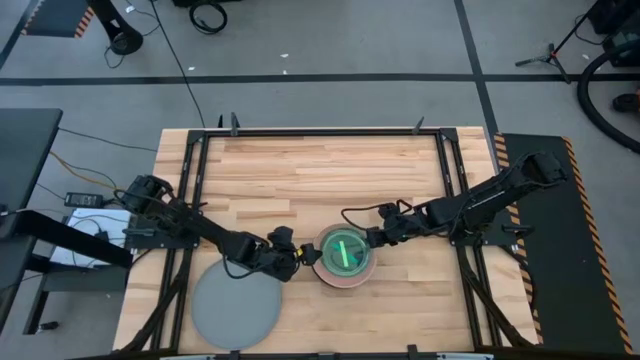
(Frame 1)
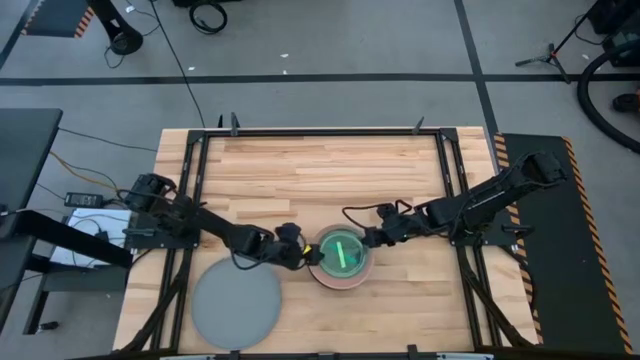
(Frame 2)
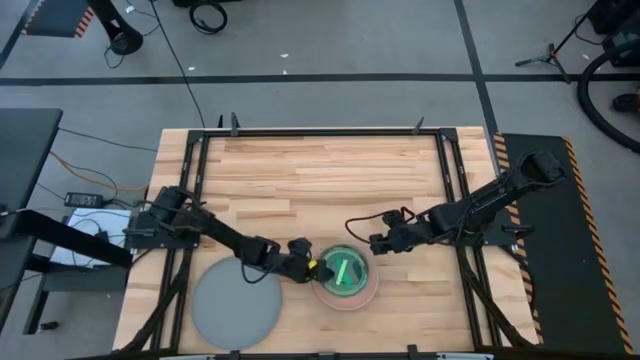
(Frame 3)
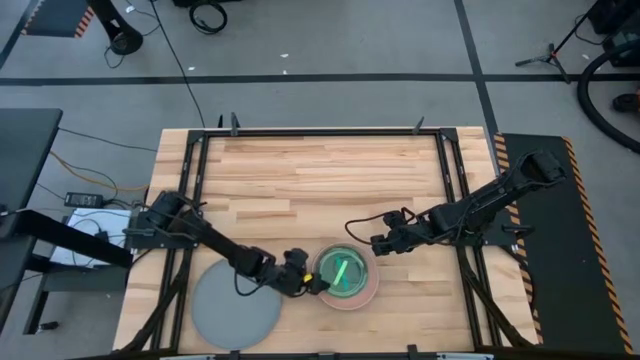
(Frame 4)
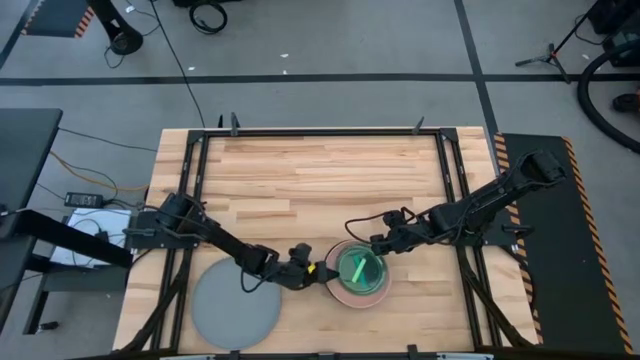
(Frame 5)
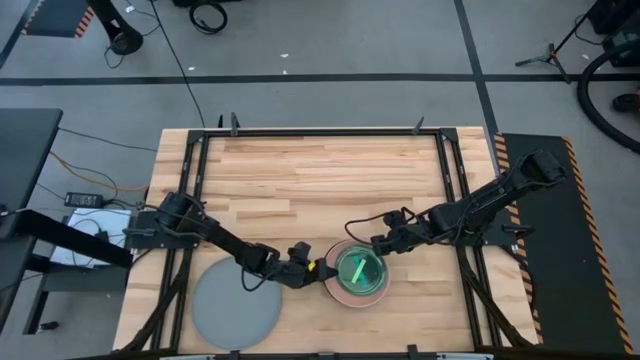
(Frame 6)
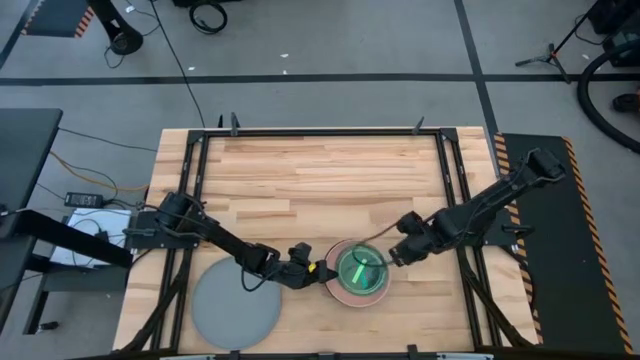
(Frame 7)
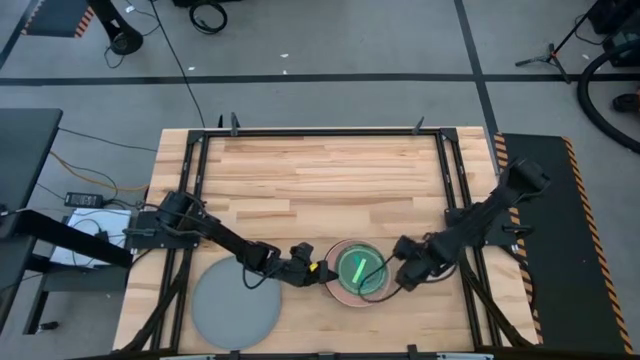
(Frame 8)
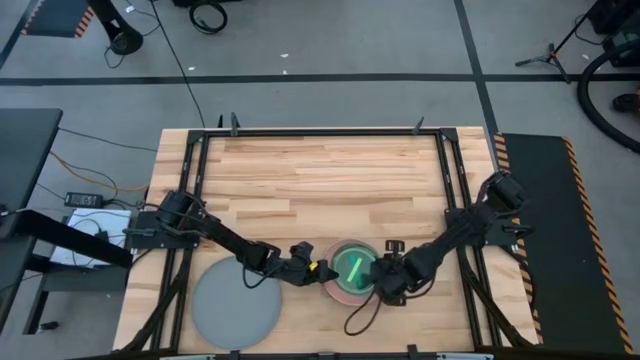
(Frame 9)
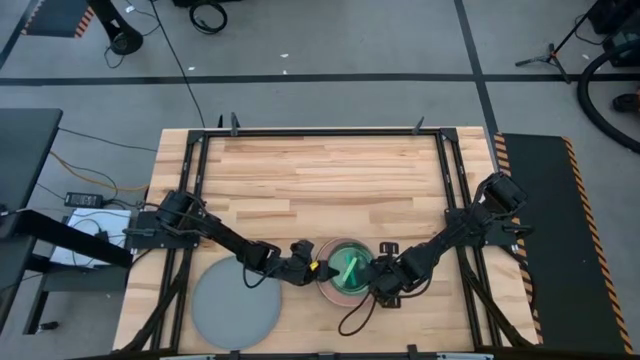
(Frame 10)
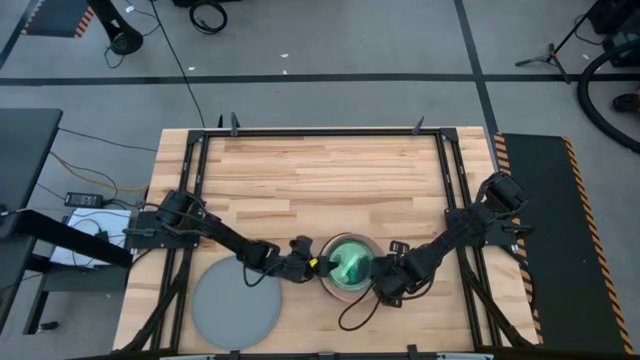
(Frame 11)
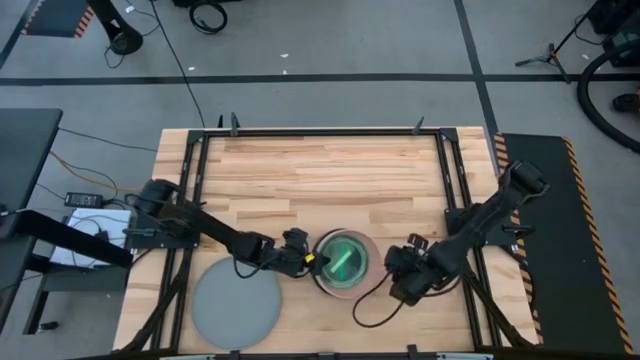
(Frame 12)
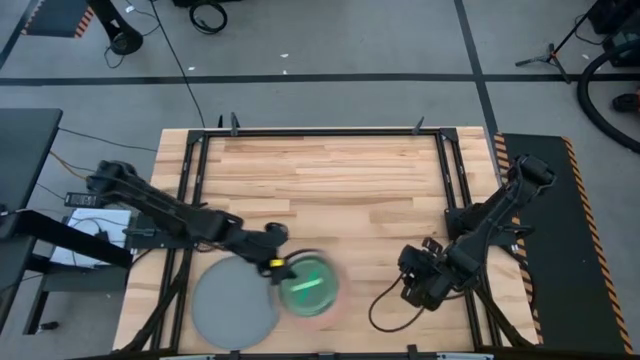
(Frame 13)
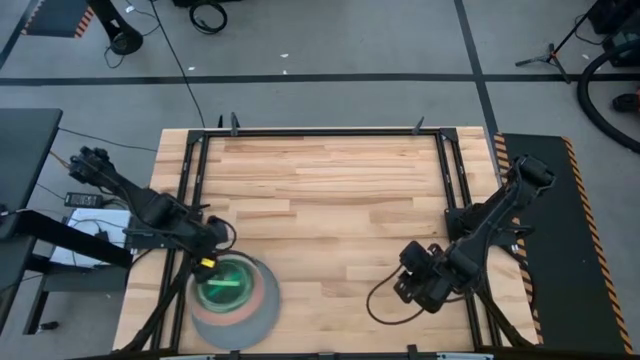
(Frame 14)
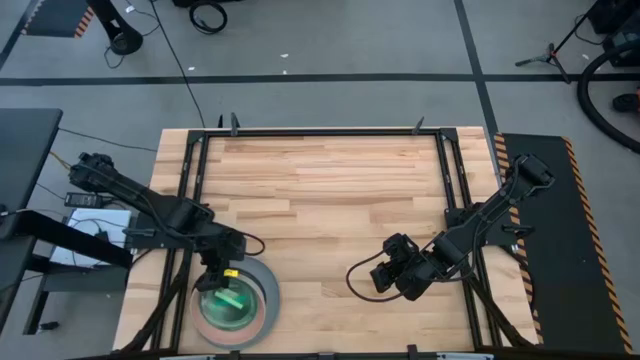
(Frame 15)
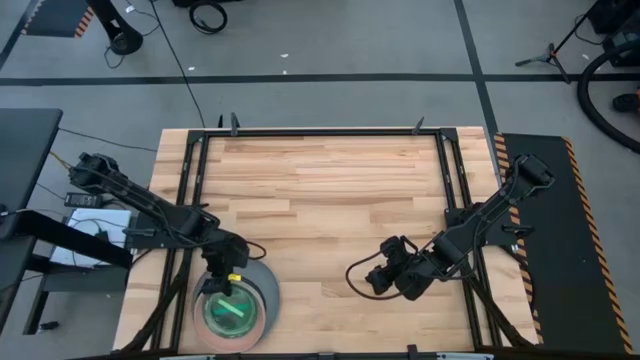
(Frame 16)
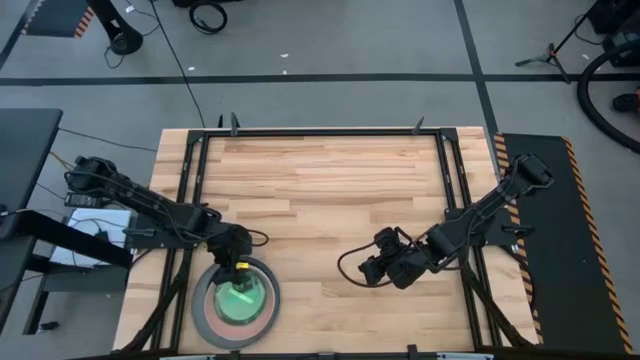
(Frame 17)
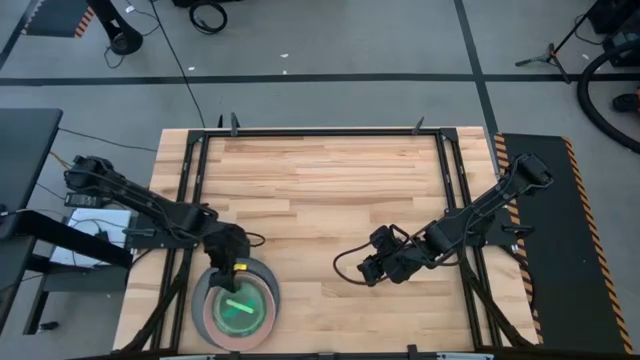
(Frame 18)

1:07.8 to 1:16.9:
Task: Stack plastic plates
Stack the stacked plates on top of the gray plate

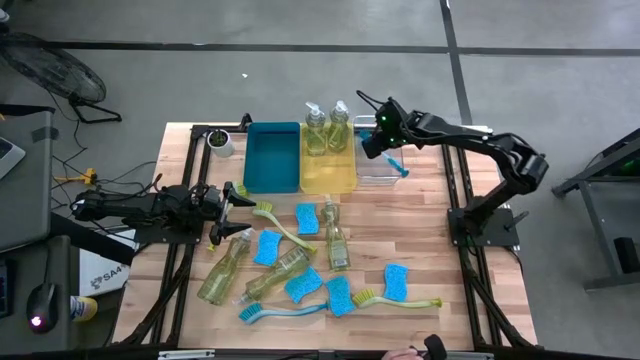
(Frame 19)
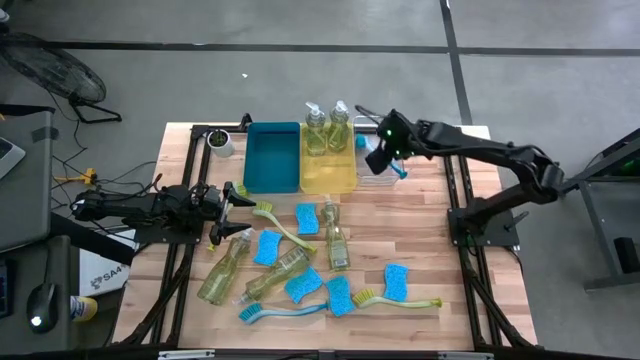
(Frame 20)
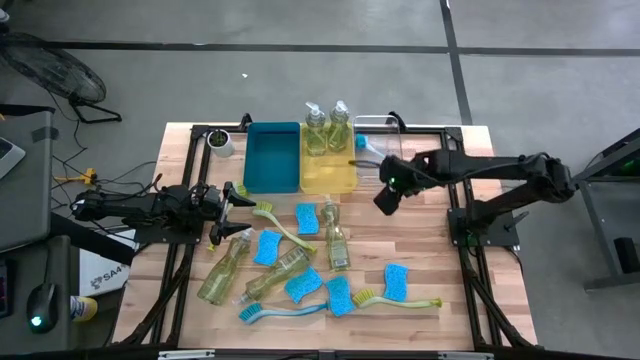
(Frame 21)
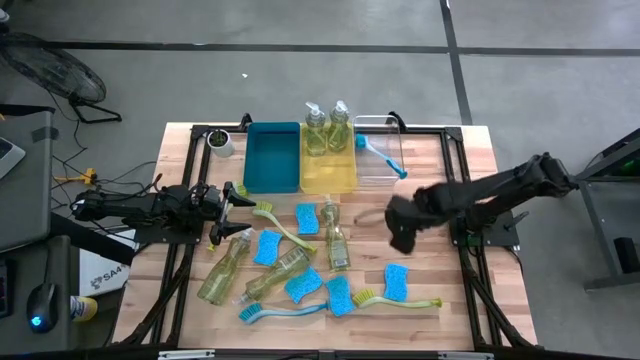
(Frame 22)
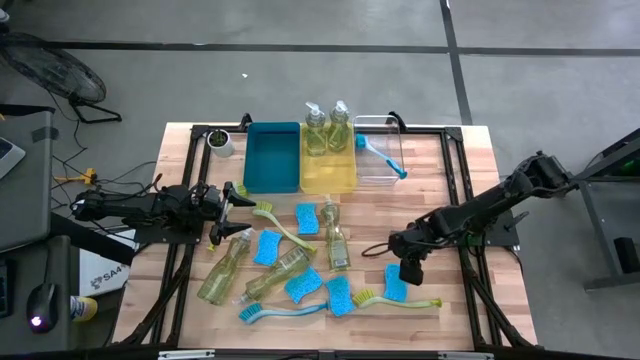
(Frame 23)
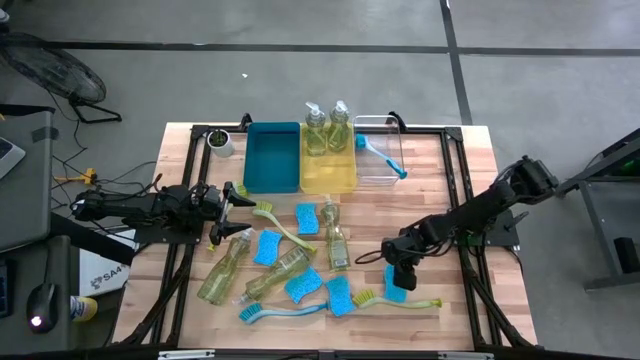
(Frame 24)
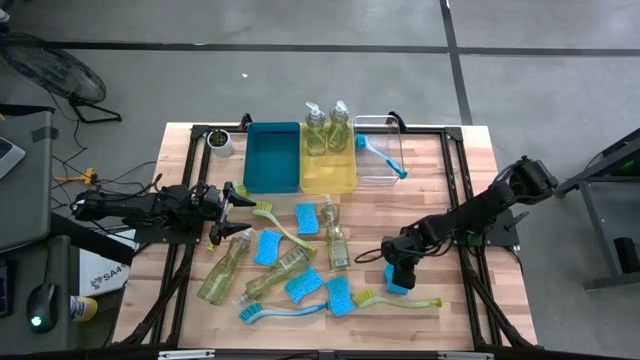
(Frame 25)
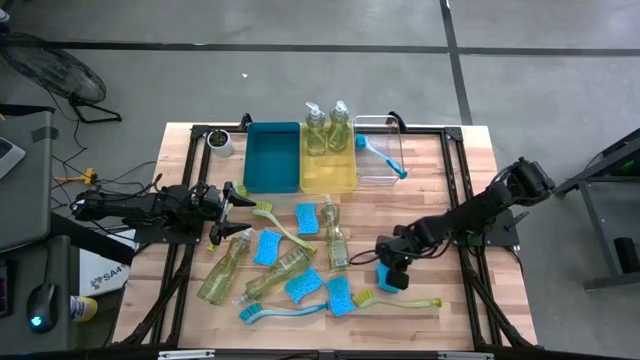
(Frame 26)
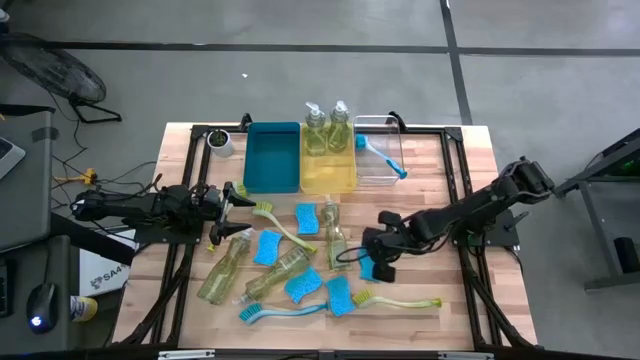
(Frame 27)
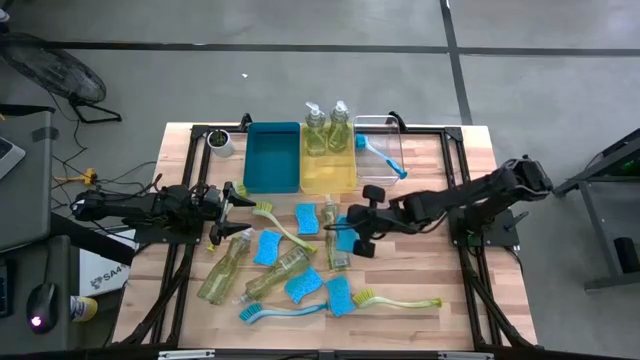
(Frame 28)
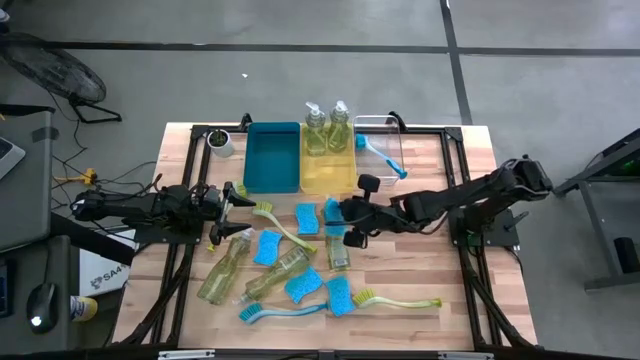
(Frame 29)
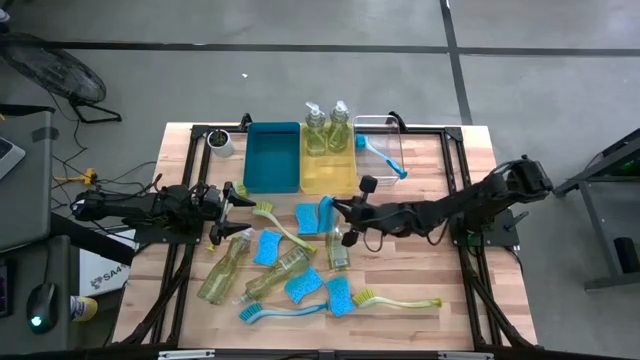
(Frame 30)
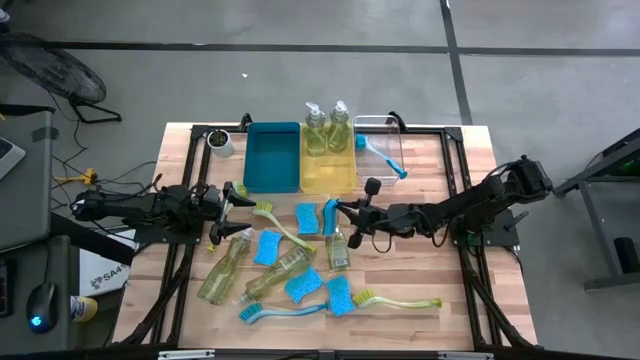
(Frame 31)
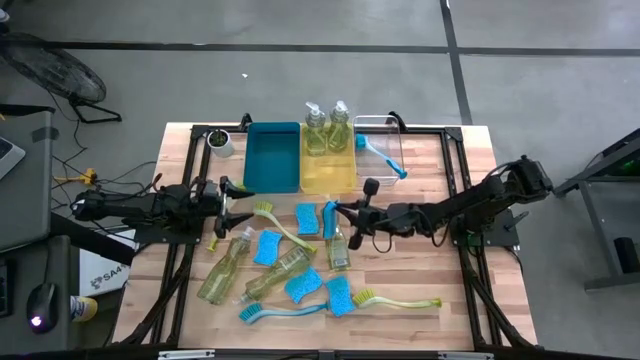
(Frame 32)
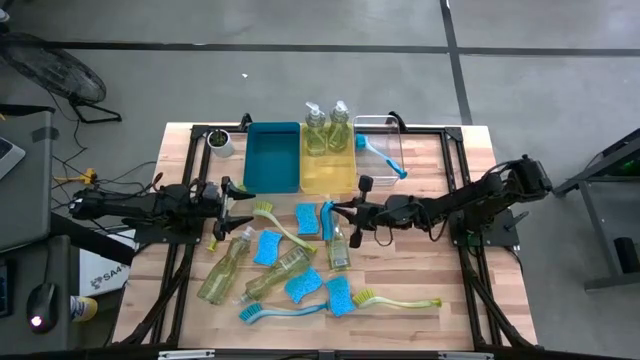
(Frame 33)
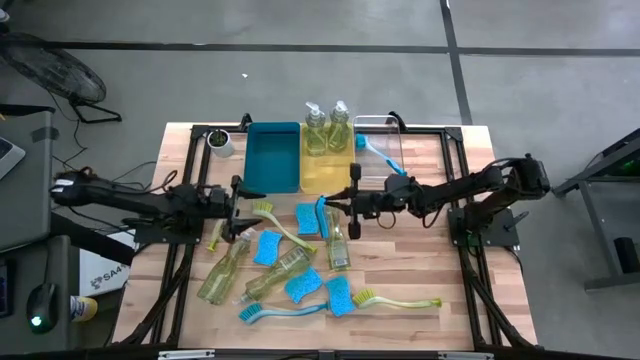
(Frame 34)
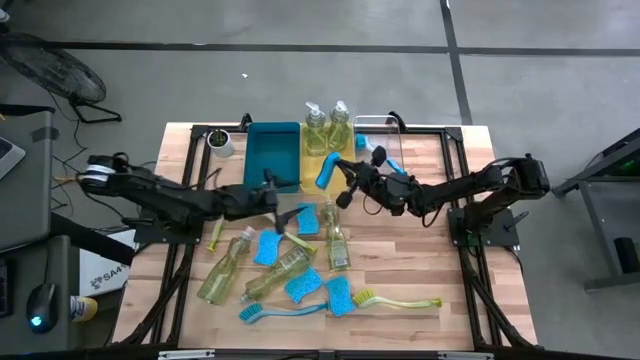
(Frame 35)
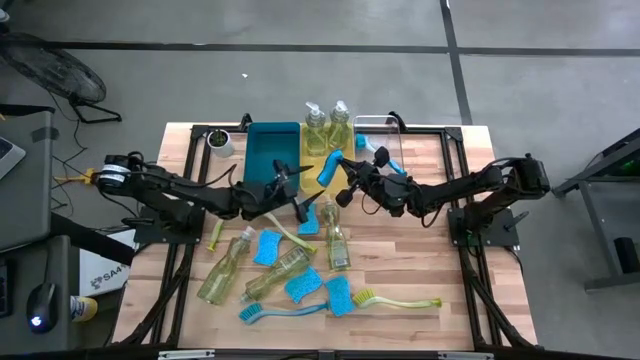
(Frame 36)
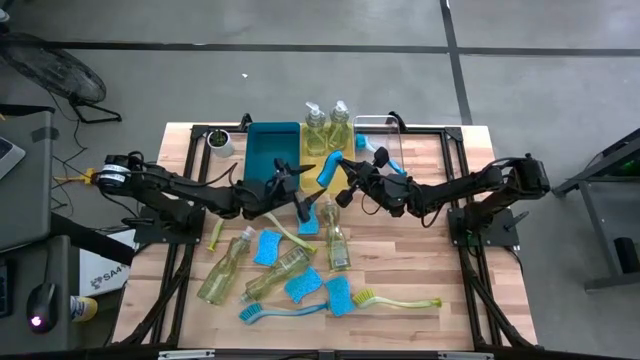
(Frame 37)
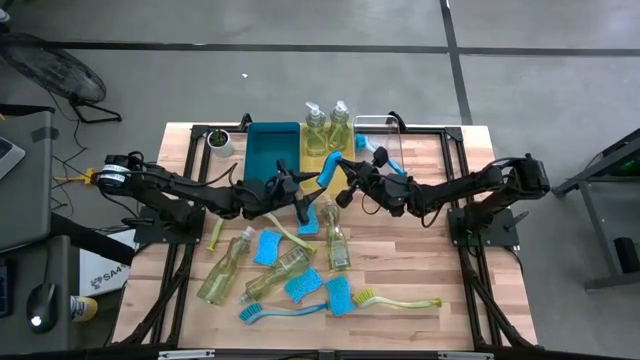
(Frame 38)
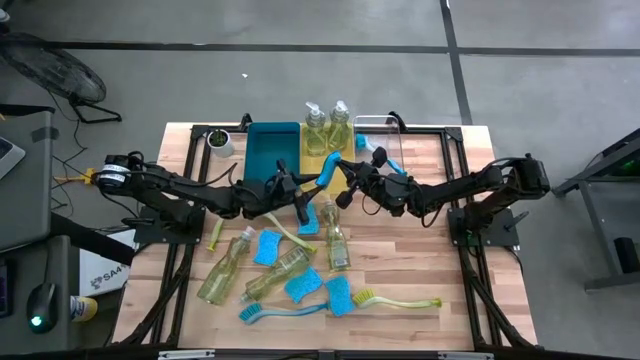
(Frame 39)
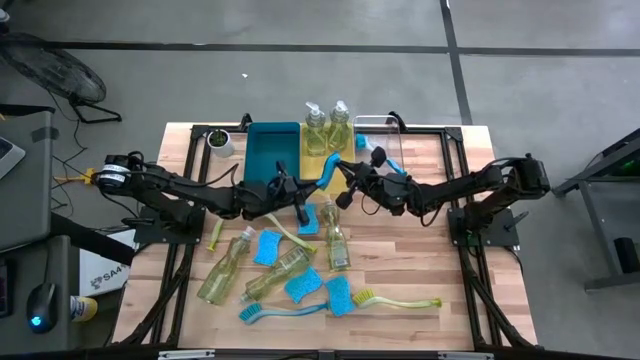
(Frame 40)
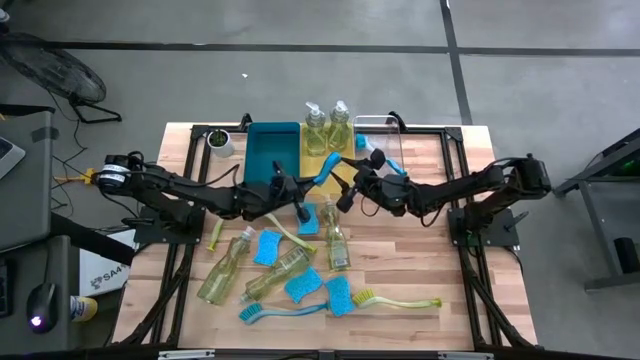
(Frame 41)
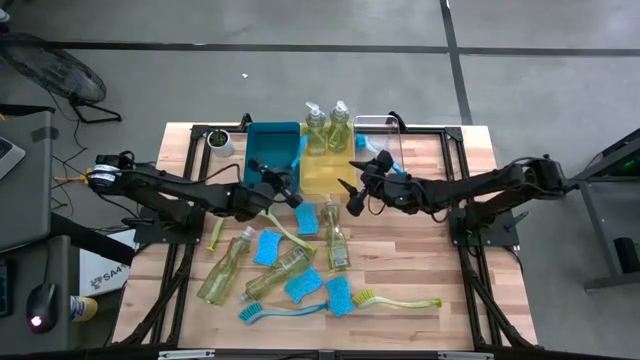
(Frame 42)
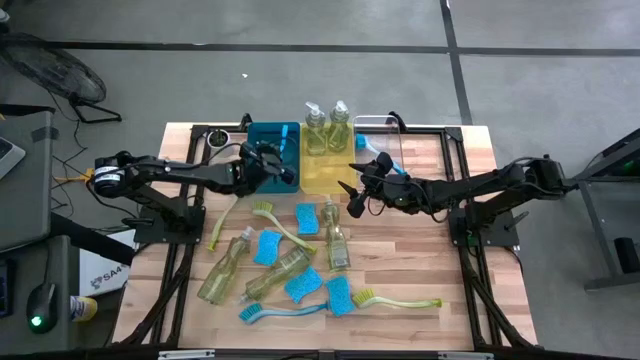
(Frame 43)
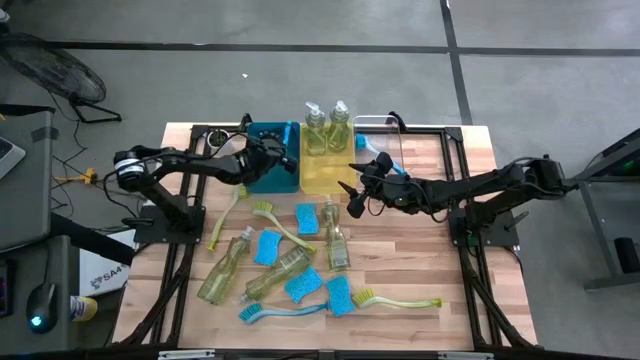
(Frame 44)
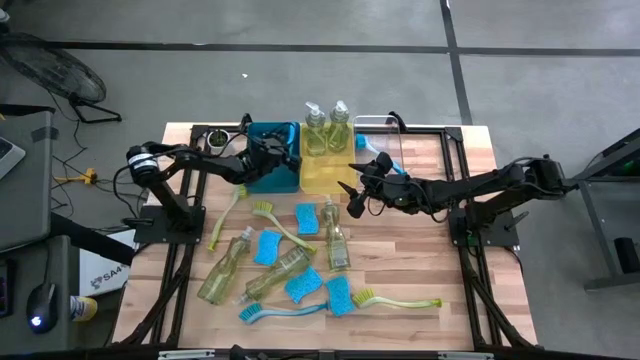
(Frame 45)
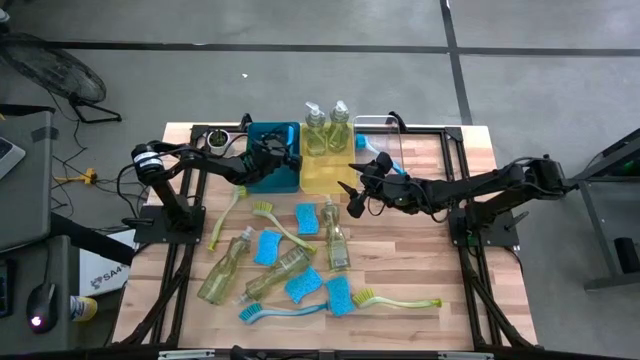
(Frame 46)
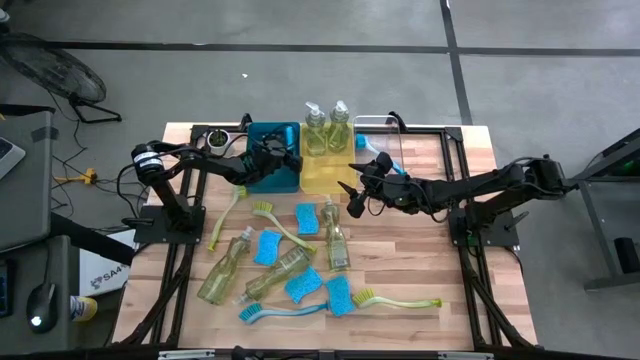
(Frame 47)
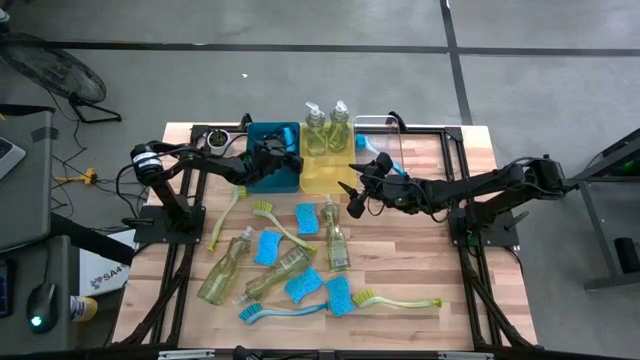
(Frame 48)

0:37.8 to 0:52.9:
Task: Pick & Place Kitchen Sink Supplies
Put the blue sponge into the blue bin
